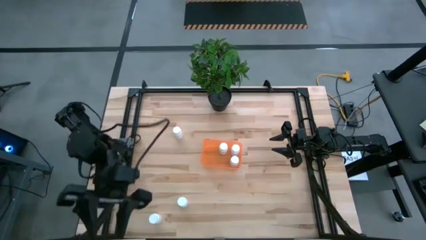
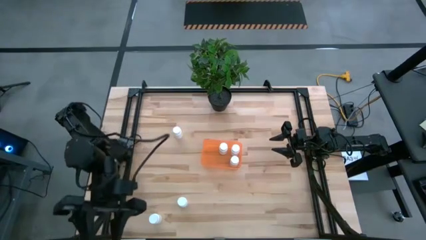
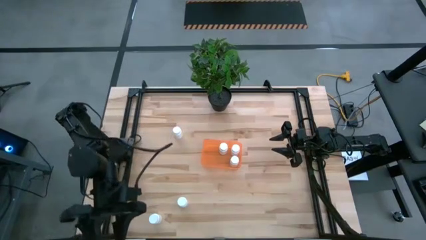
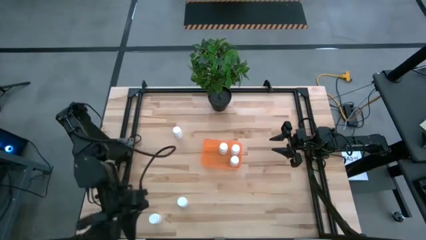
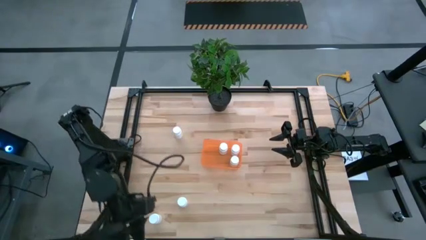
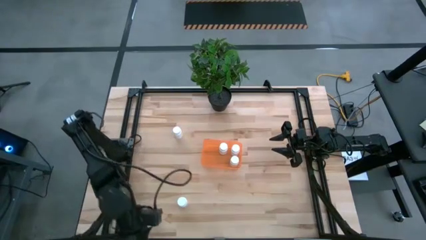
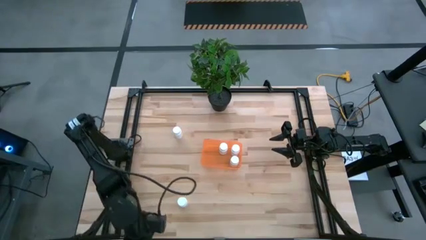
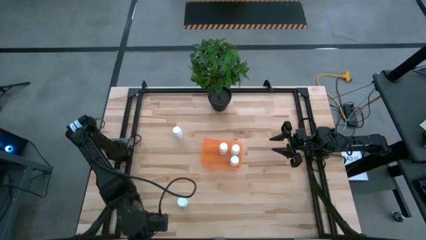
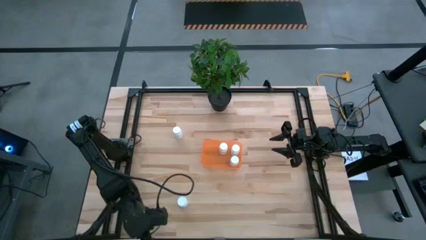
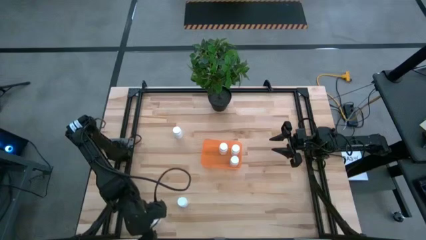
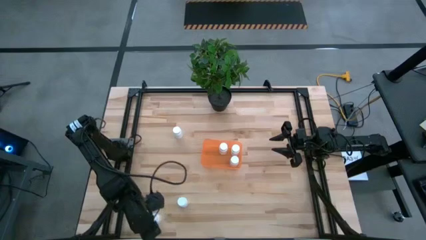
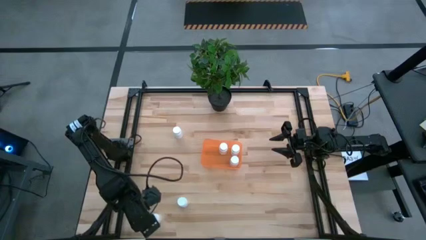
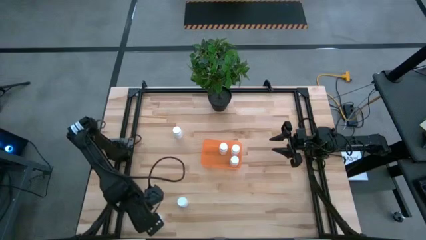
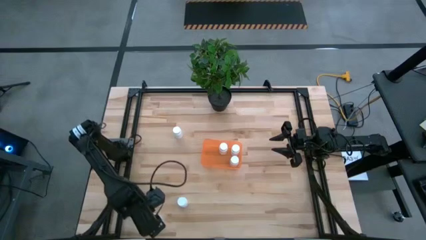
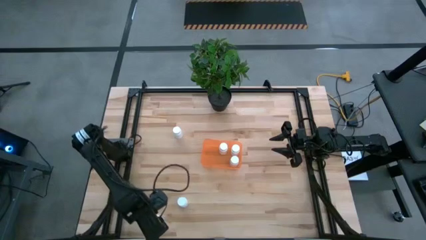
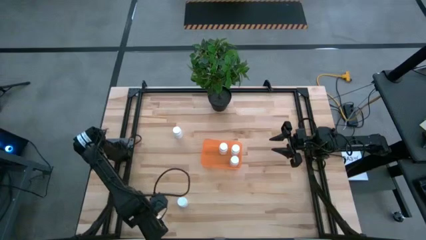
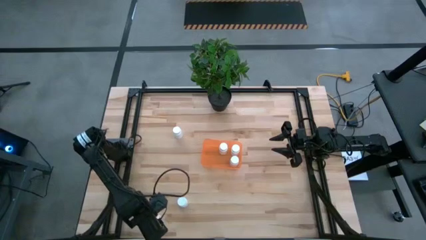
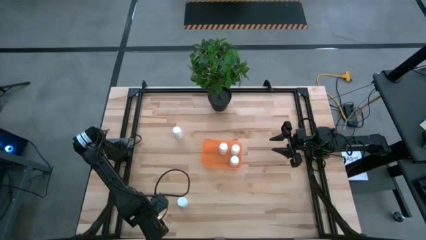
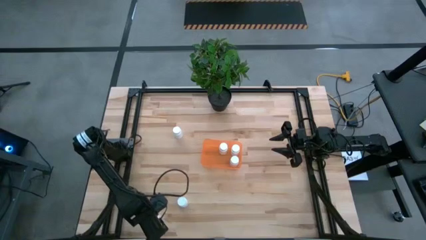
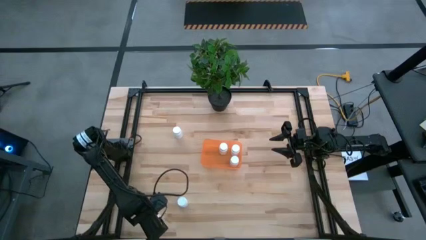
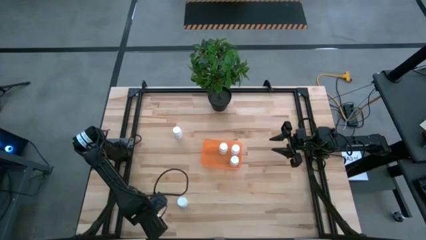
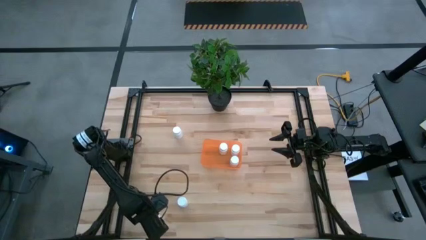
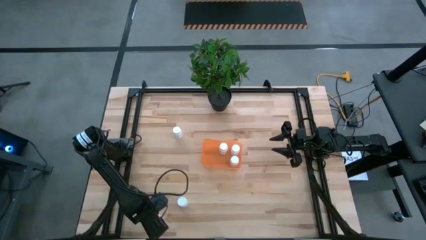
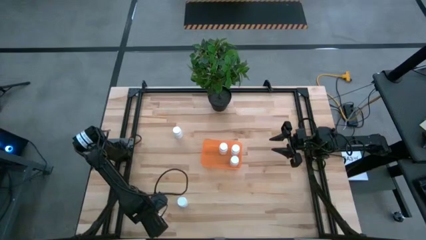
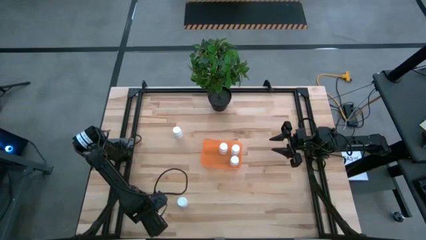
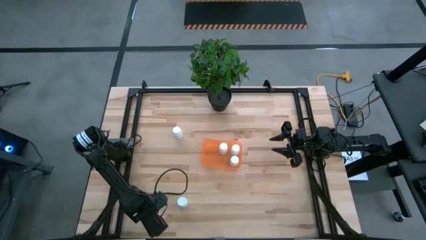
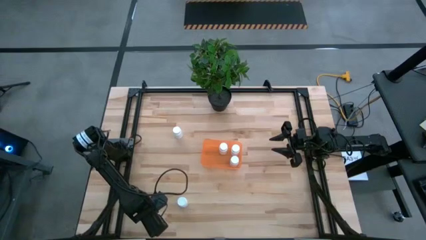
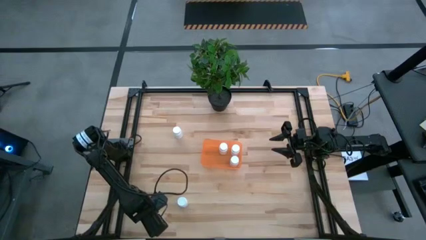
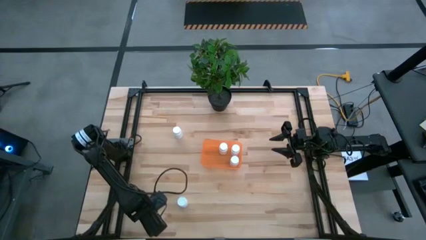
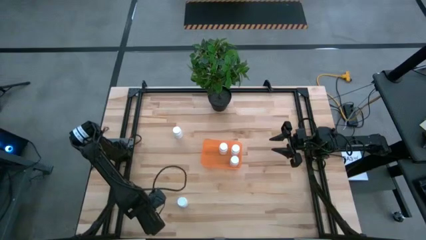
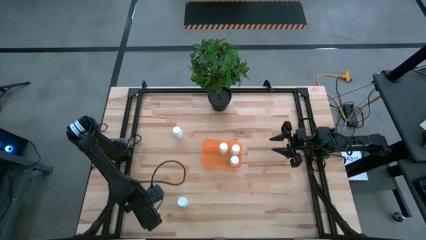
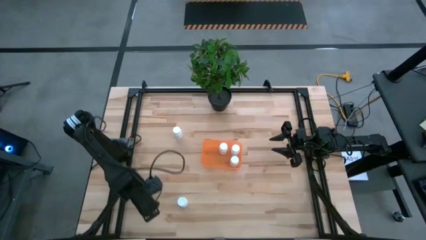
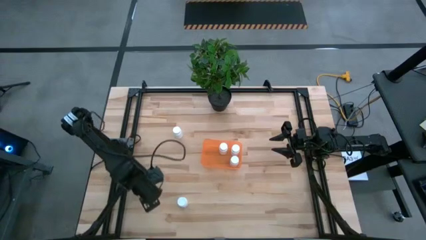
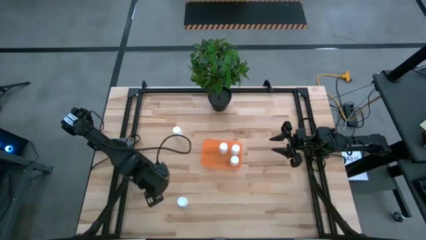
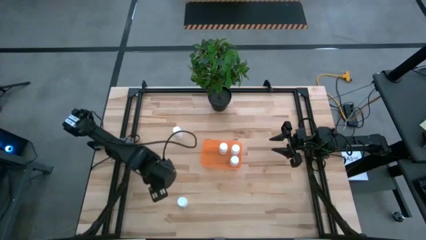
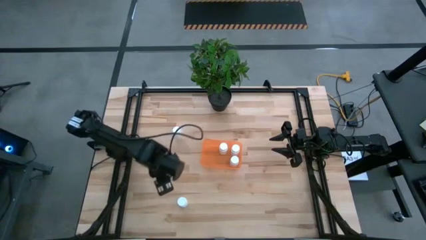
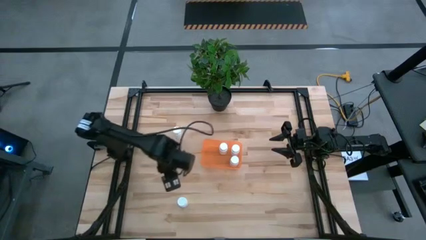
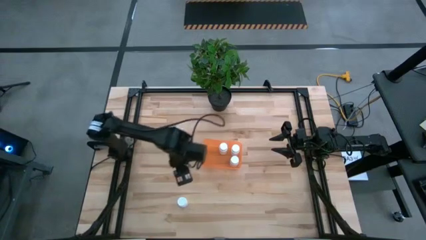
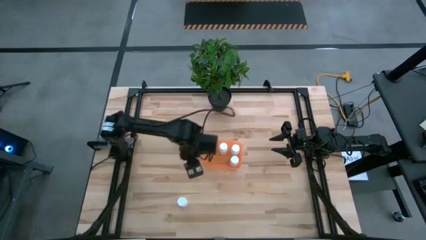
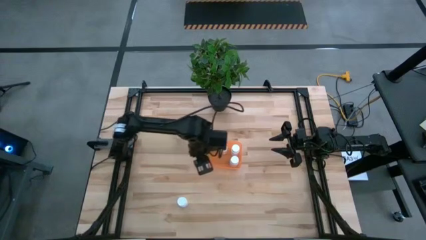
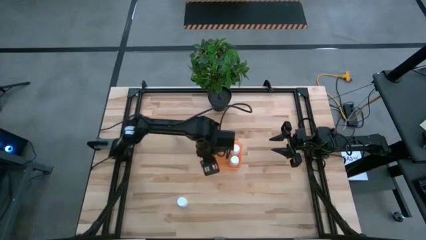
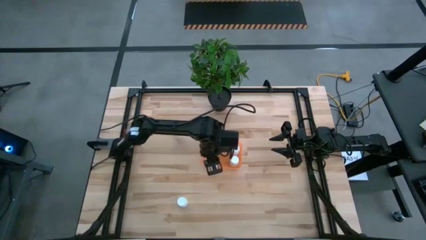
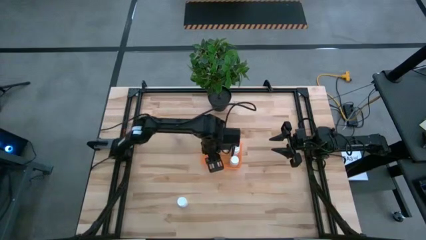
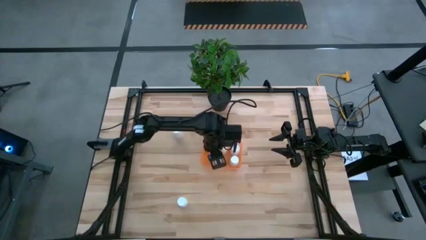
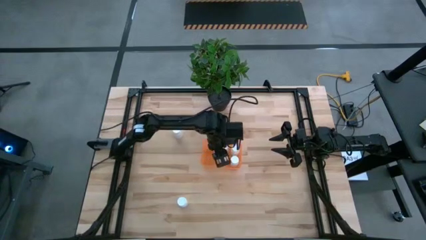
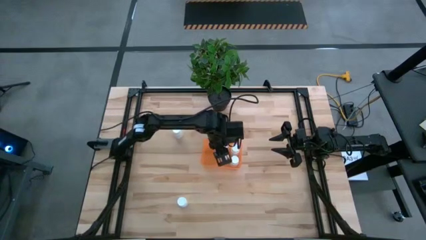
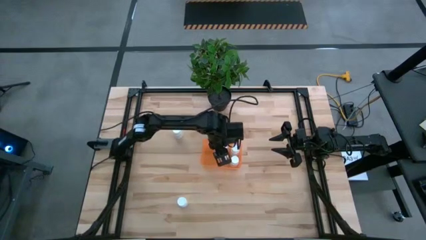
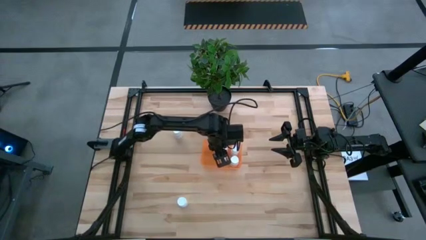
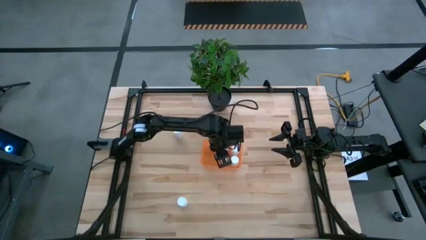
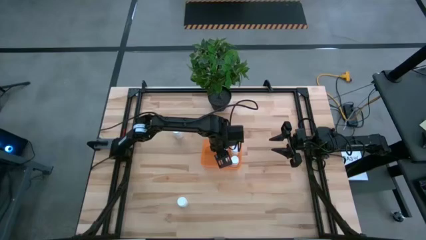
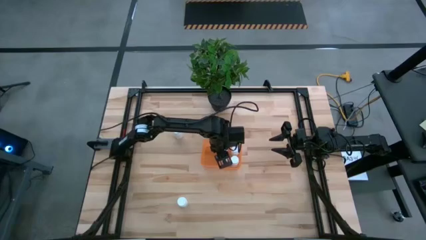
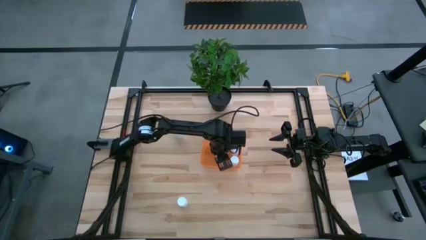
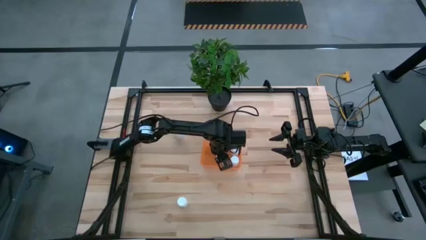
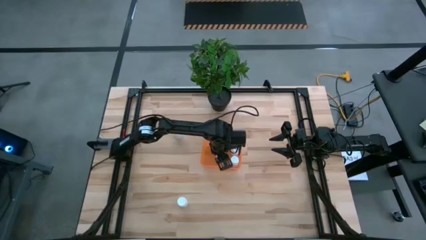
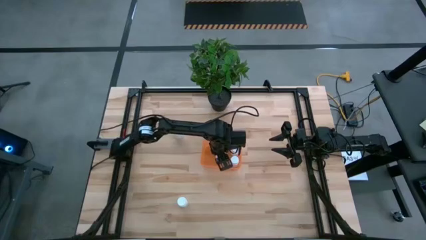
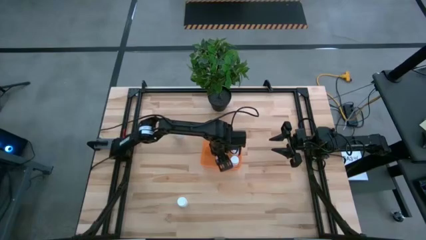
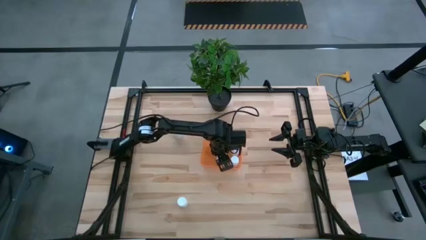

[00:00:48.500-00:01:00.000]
Task: Pick and place pill bottles into a basket
Put the white pill bottle into the orange bin
